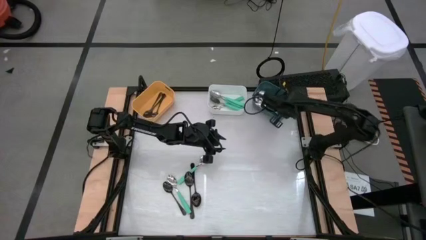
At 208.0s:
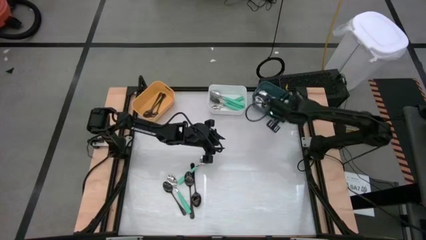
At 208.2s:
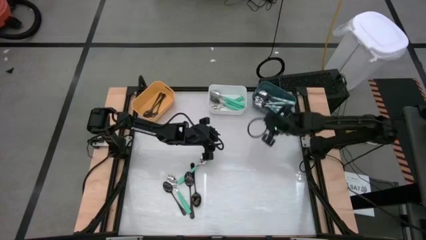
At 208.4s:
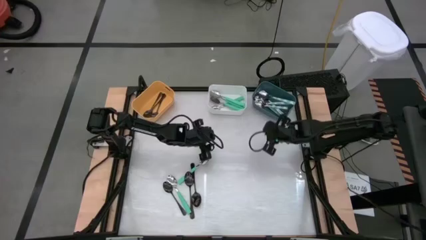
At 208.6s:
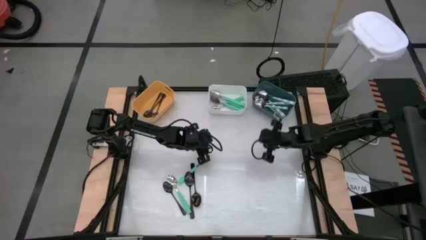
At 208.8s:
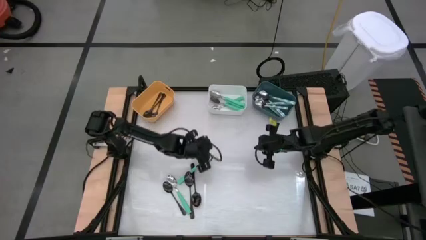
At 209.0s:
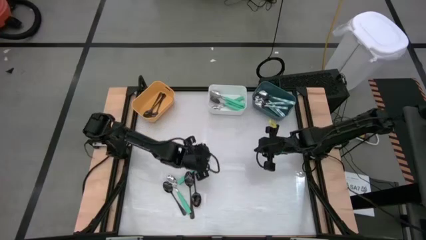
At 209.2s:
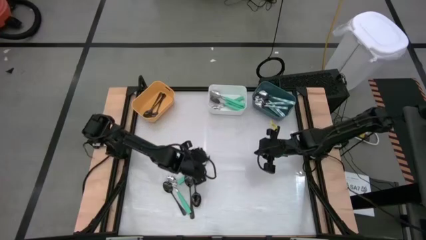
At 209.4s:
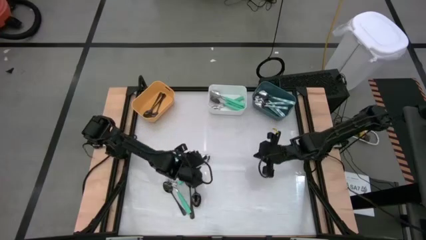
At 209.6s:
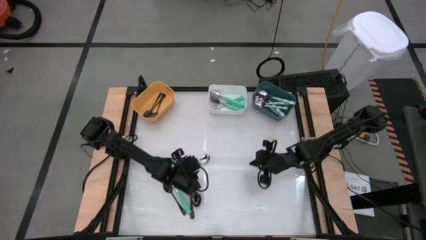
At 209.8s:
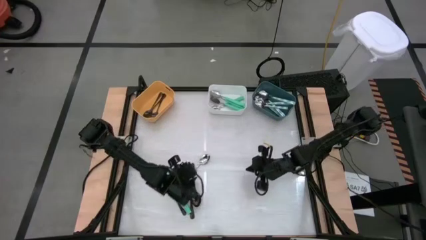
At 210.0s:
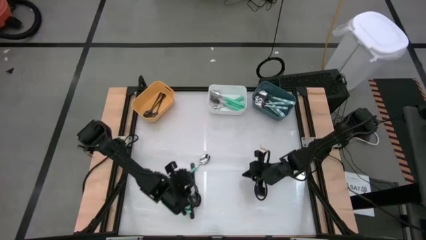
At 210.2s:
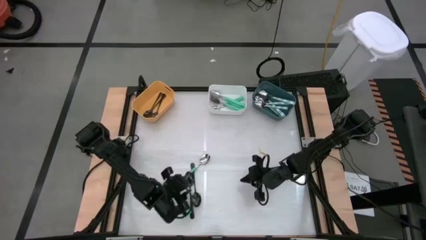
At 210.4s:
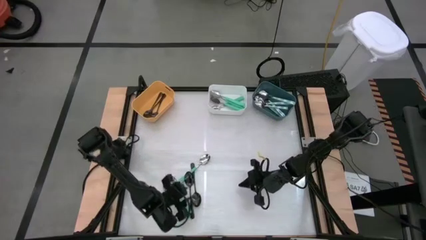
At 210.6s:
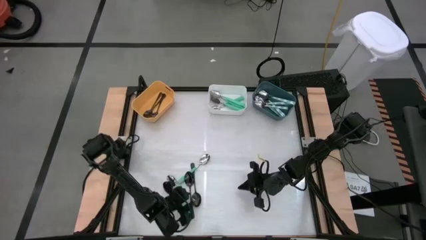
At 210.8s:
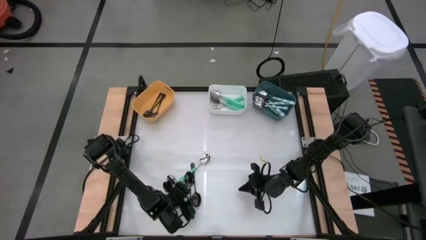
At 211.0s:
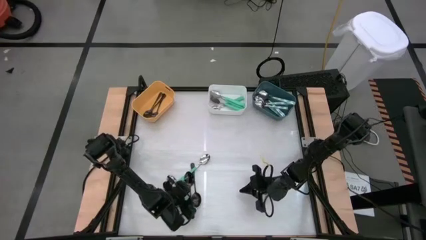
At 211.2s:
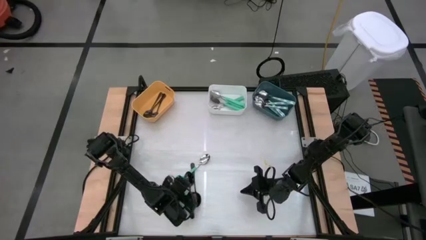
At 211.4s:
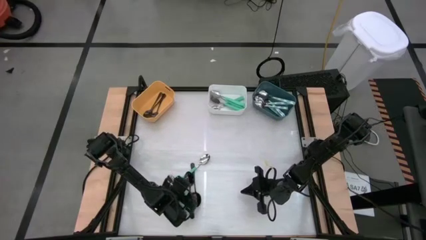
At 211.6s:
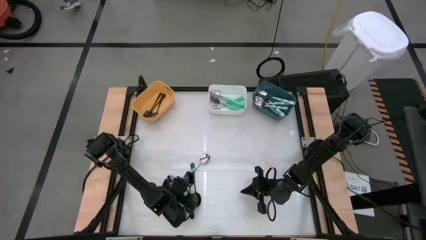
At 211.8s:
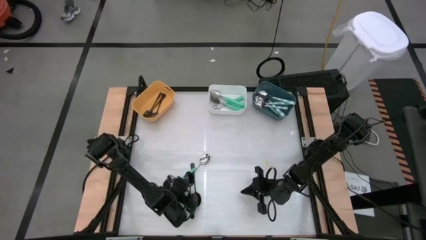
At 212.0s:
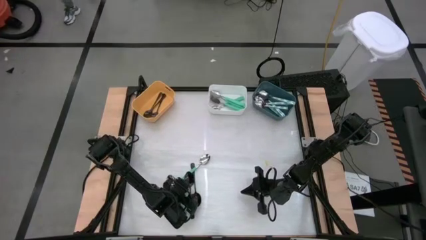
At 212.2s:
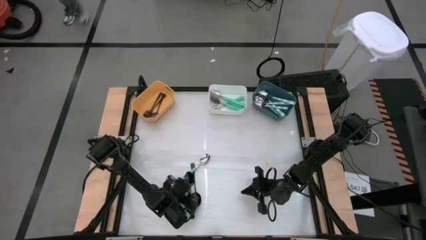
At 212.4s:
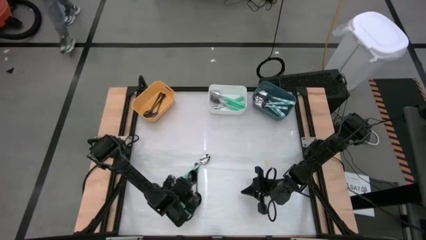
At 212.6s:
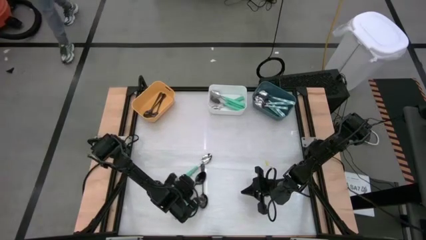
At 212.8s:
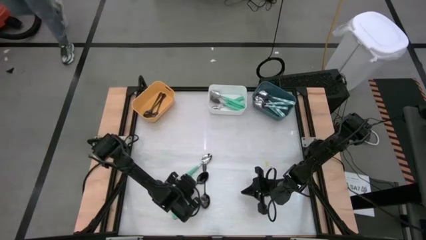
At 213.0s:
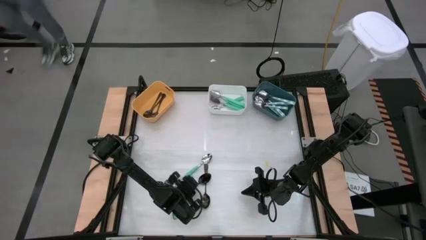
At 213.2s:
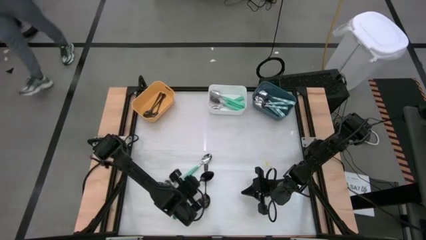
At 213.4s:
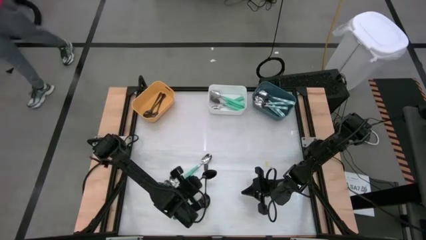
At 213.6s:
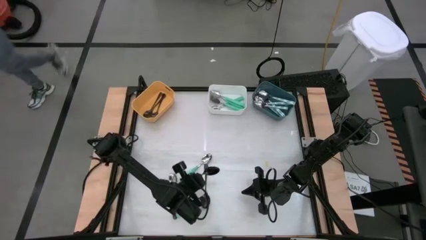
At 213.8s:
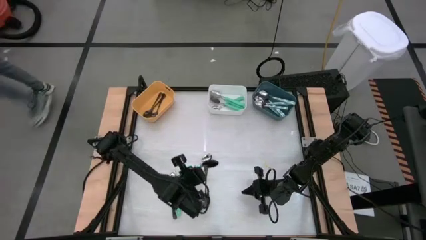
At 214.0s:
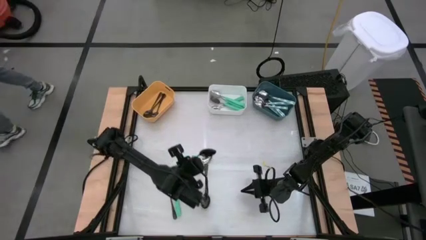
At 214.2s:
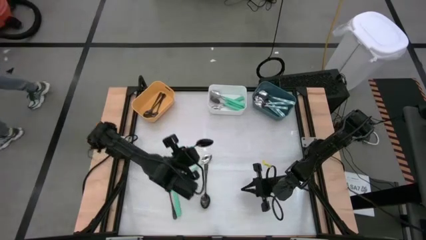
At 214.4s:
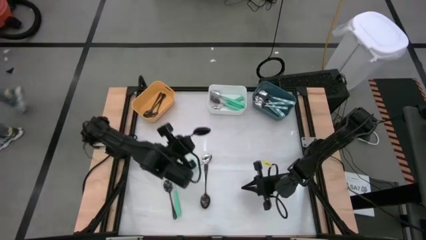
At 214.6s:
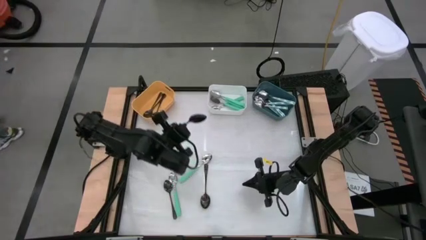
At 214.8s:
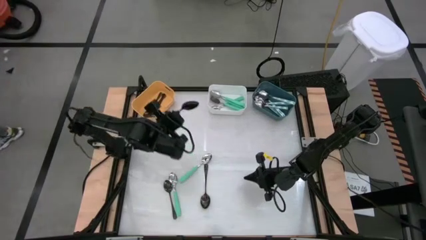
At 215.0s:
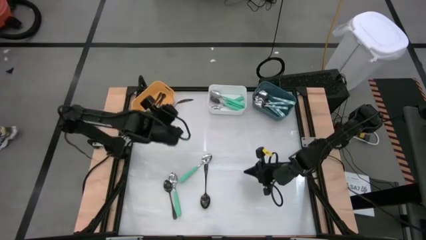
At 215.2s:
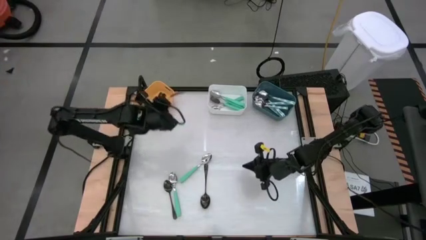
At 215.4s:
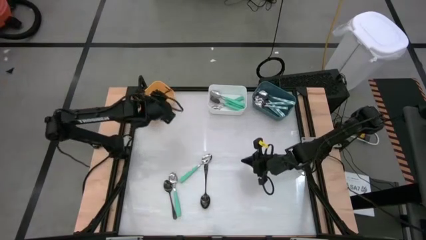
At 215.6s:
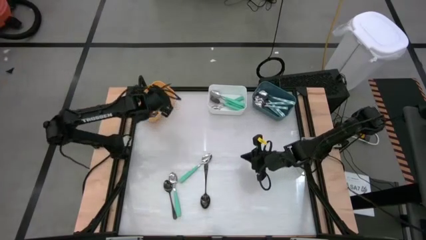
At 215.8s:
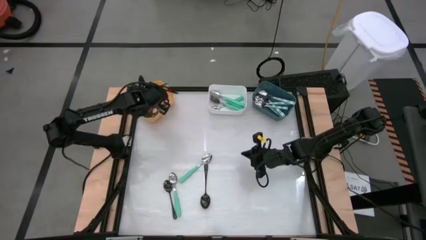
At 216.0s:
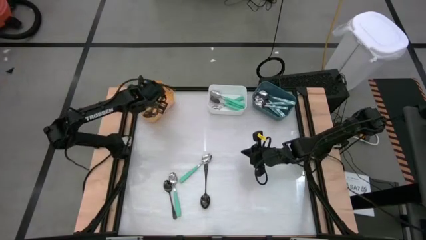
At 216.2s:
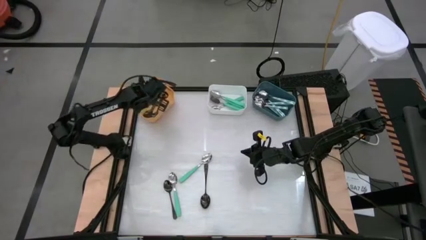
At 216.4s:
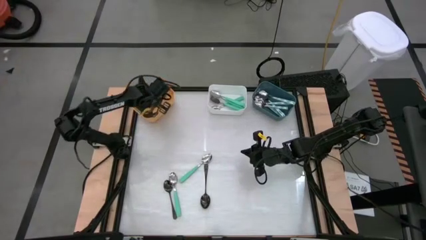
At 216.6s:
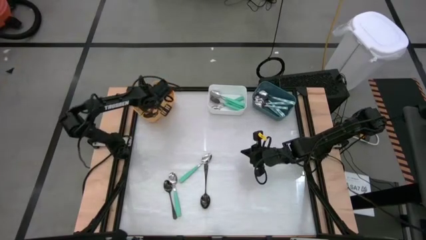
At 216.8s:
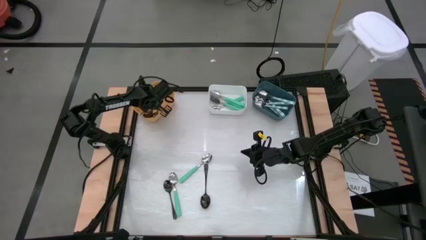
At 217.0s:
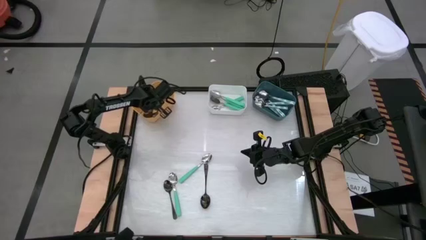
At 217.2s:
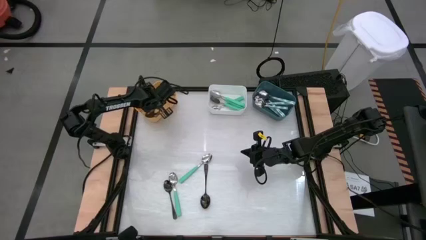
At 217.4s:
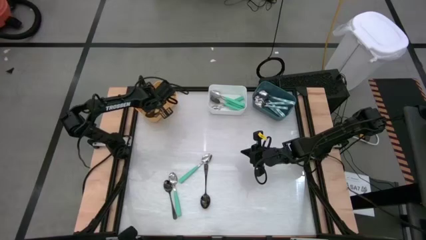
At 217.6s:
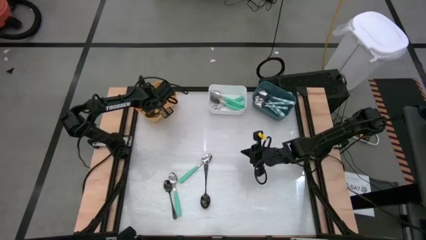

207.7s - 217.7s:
Task: Sort silverware by color (type)
Put the black spoon into the orange bin

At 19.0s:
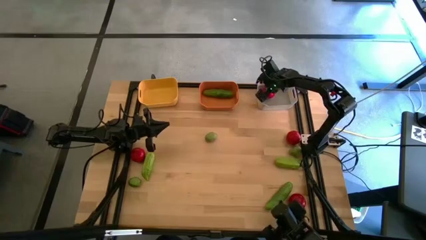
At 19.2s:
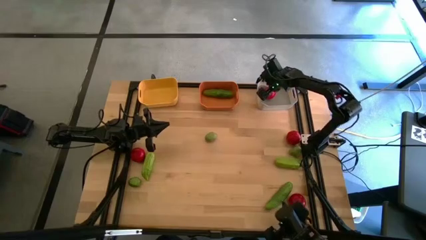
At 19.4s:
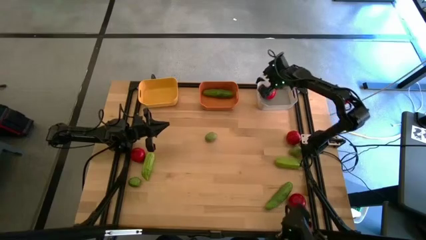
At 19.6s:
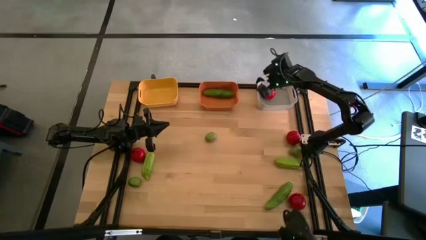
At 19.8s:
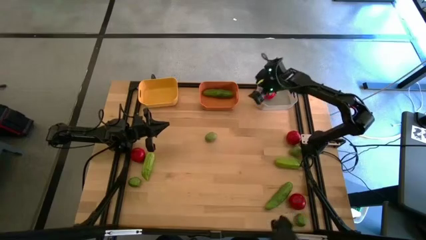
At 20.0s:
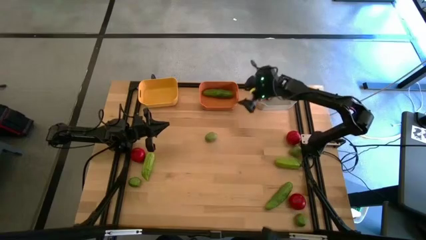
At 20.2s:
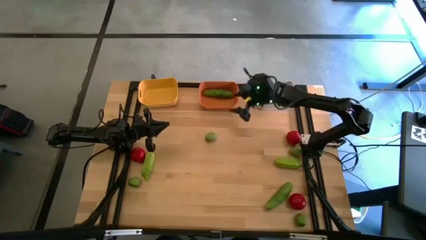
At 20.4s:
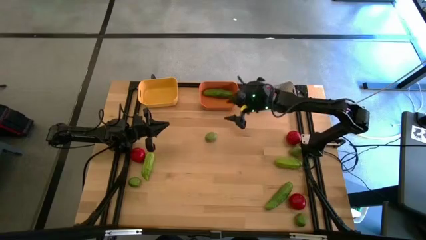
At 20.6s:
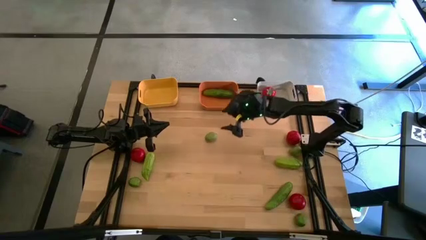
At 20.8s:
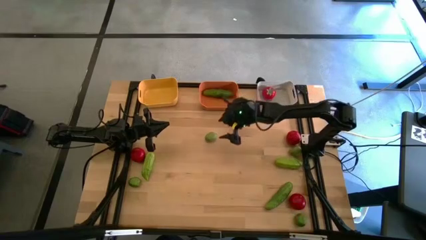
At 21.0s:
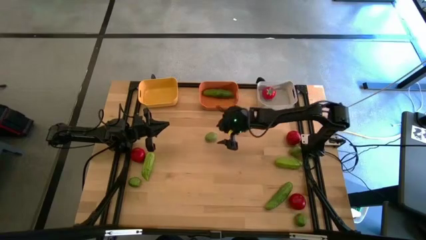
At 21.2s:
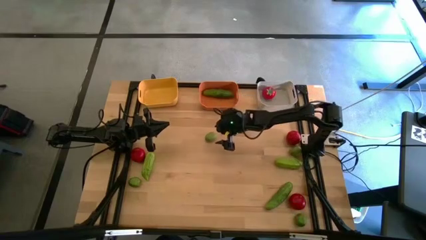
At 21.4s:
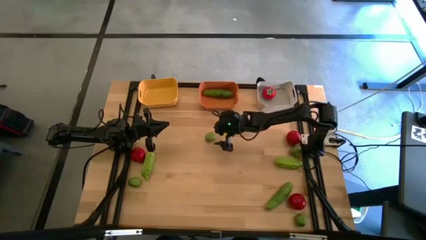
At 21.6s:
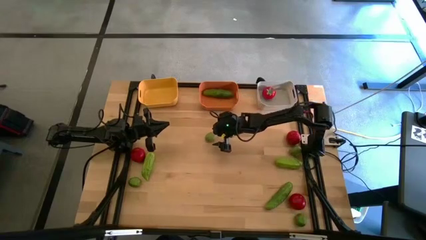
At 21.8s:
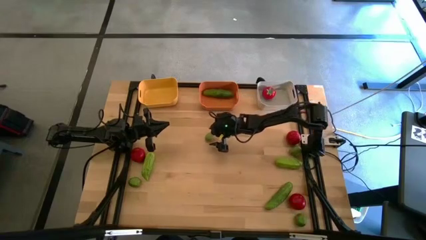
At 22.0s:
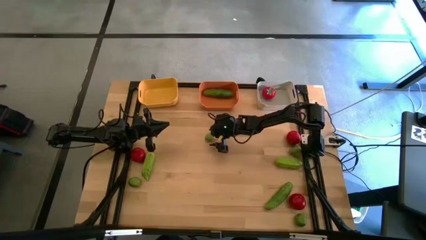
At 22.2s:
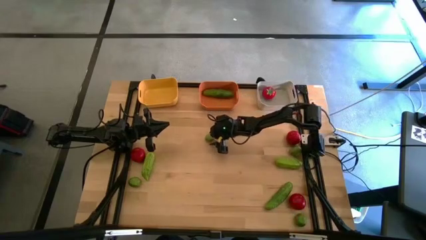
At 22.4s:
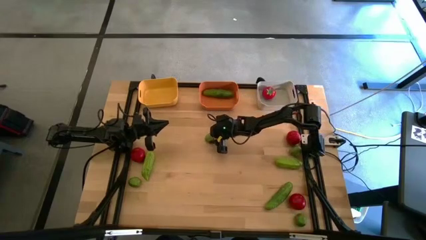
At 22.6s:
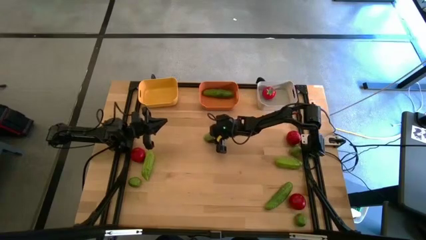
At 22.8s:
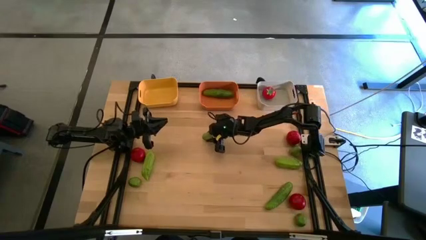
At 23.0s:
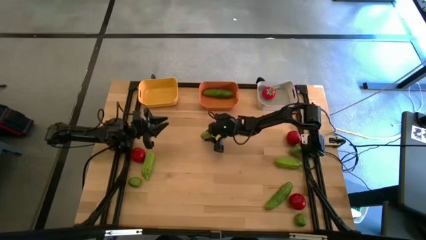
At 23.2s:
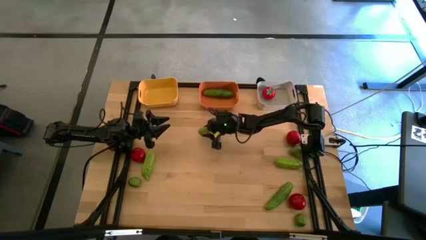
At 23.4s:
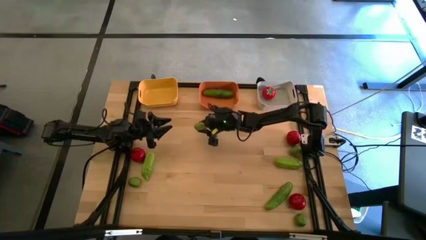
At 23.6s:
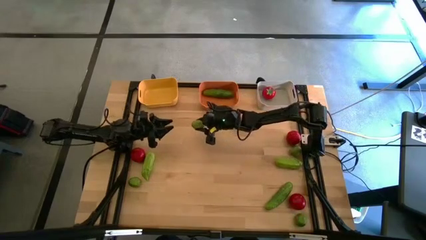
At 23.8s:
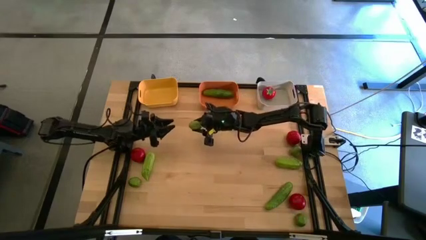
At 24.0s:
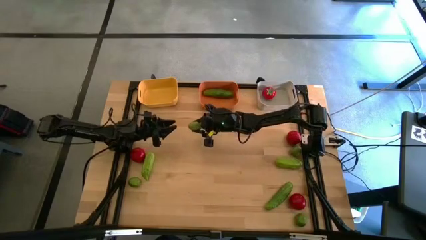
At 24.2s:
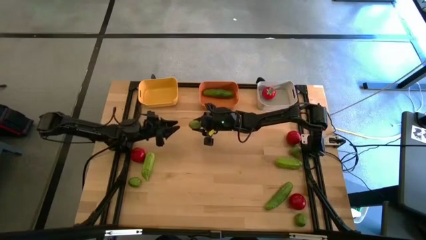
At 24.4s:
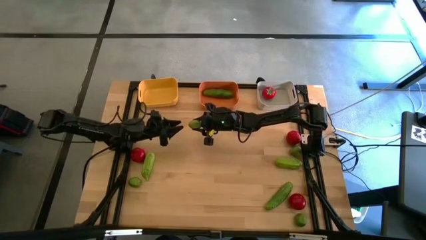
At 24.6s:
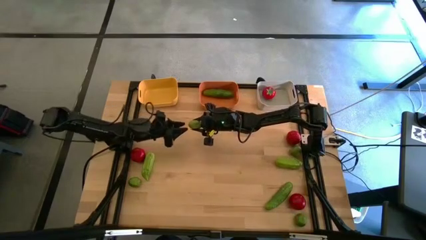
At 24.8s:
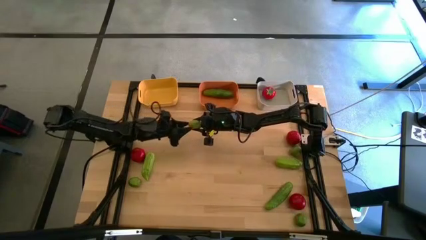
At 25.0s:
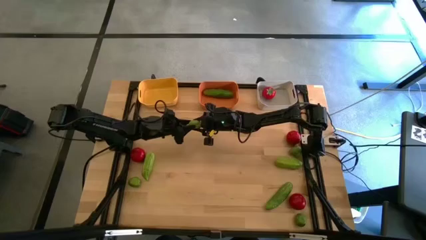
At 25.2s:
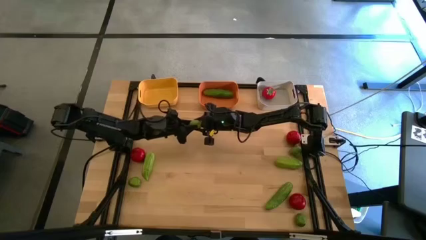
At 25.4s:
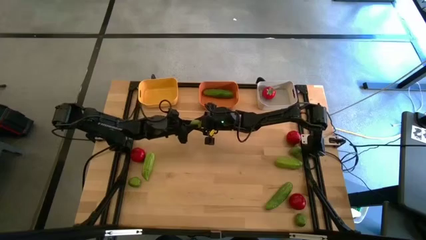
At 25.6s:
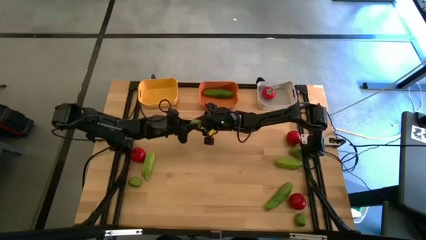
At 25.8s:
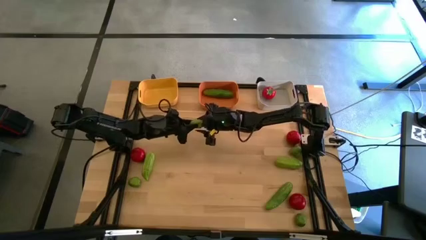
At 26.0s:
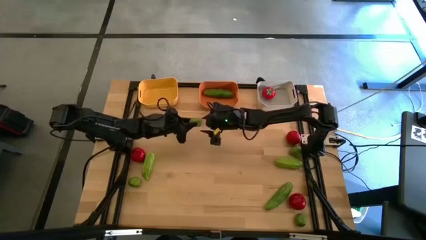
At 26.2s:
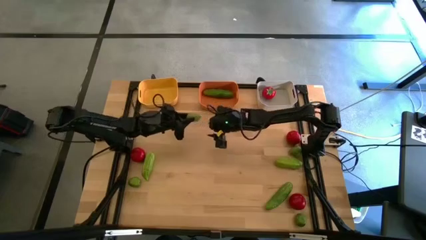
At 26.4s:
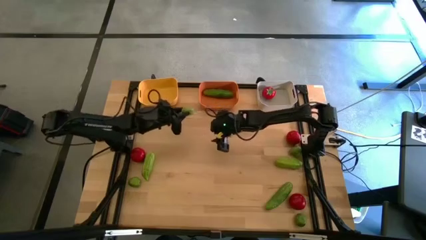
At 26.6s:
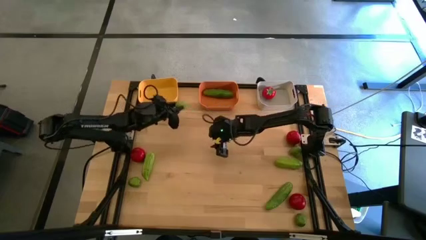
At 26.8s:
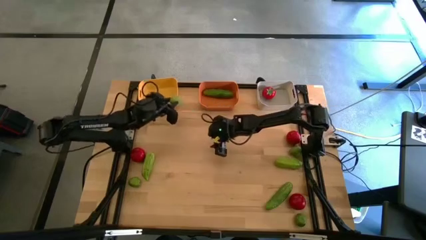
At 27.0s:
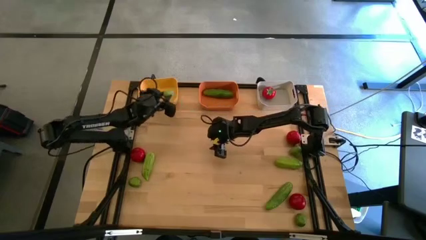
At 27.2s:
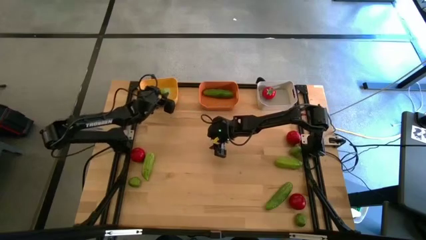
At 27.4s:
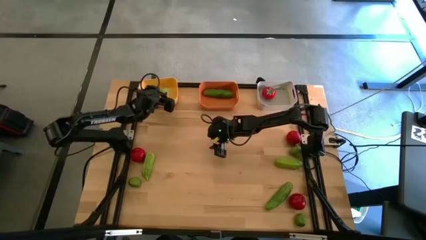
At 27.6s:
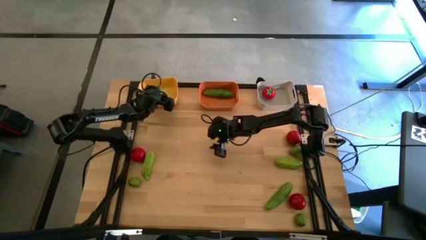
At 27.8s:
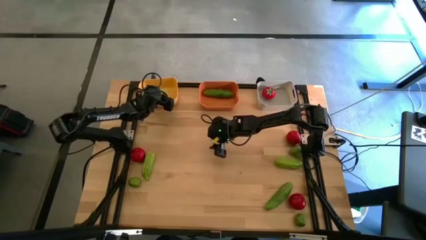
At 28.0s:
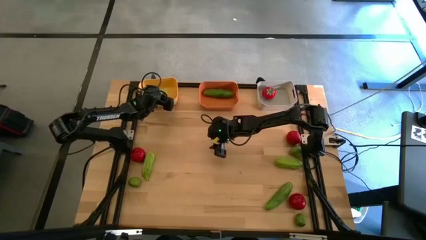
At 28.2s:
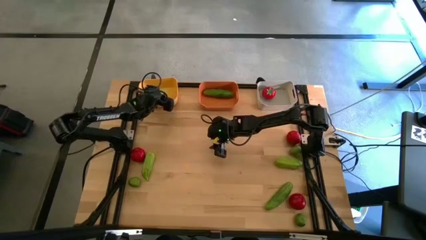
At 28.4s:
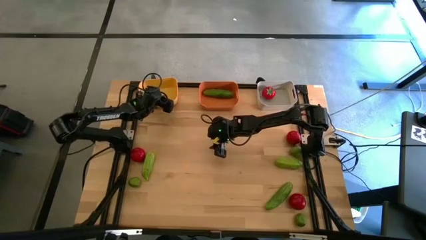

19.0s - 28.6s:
Task: Sort produce into baskets
Put the lime into the yellow bin
